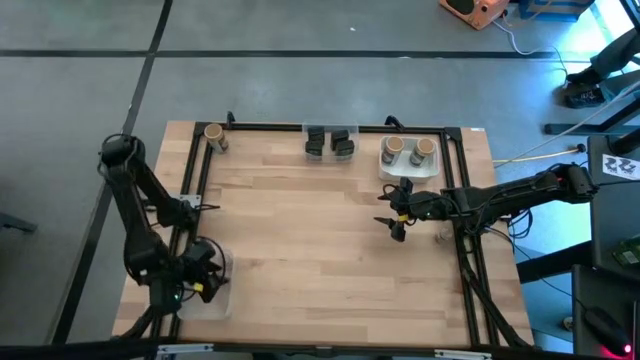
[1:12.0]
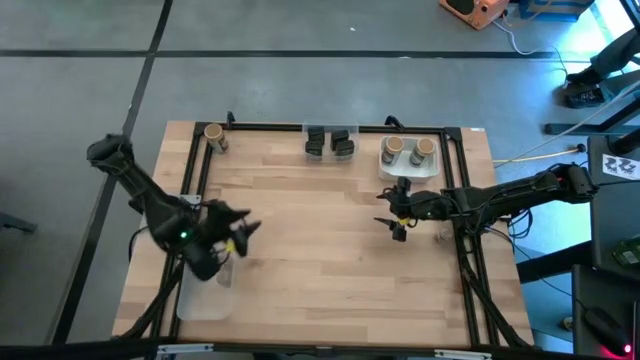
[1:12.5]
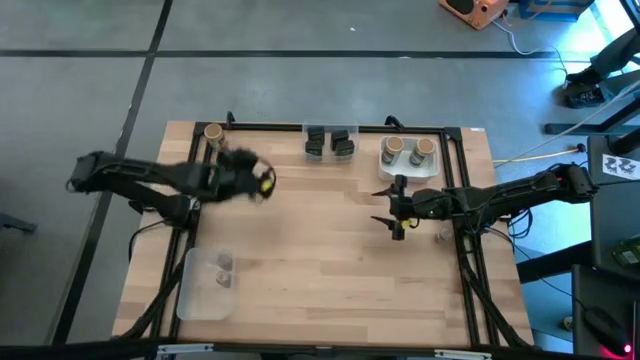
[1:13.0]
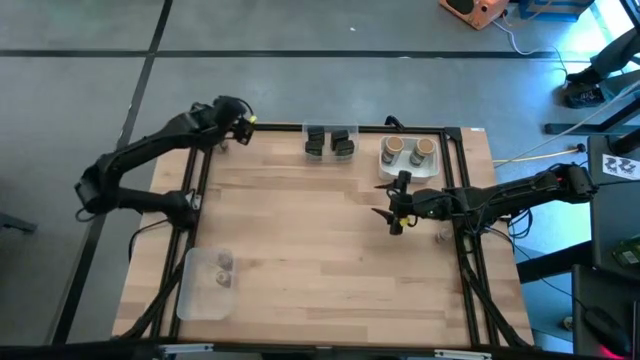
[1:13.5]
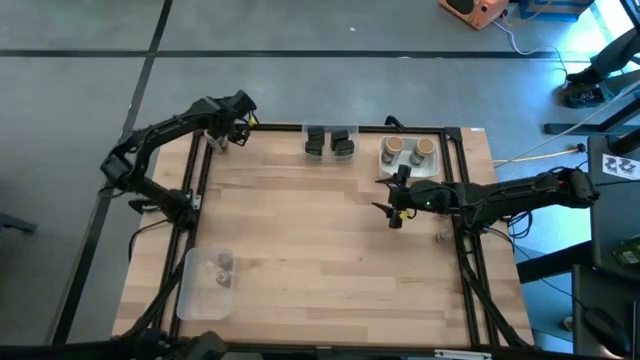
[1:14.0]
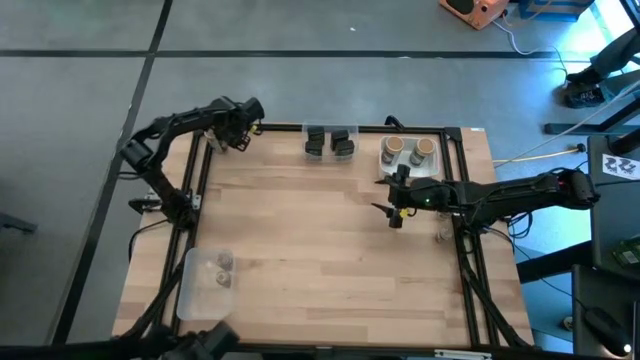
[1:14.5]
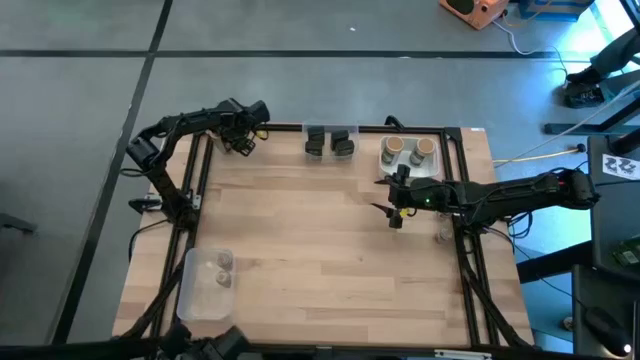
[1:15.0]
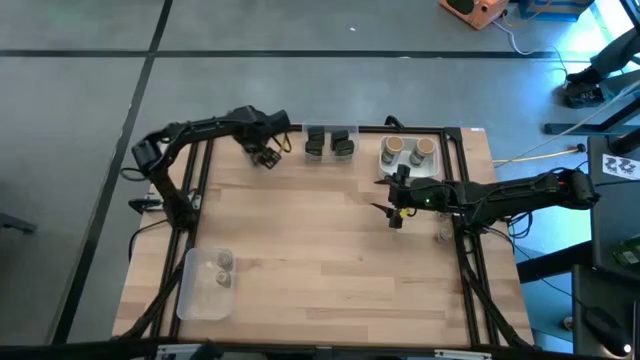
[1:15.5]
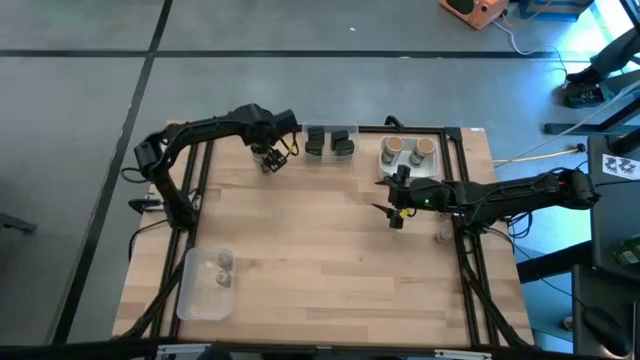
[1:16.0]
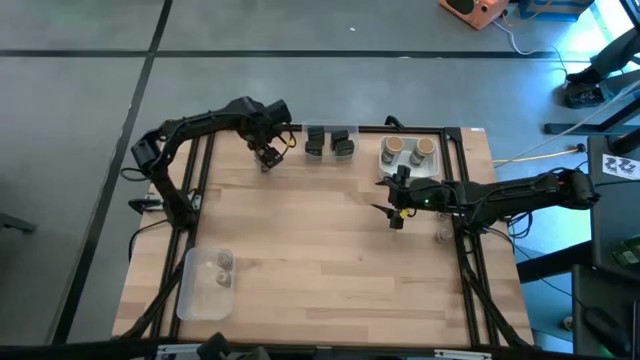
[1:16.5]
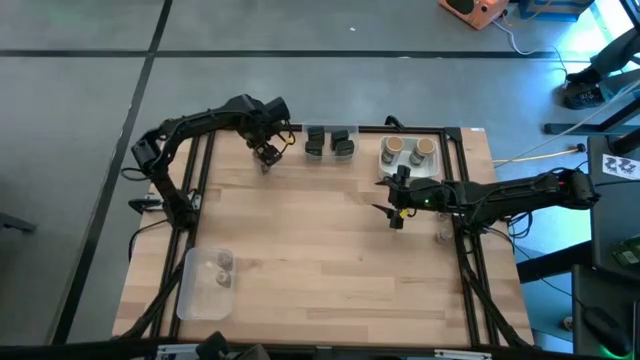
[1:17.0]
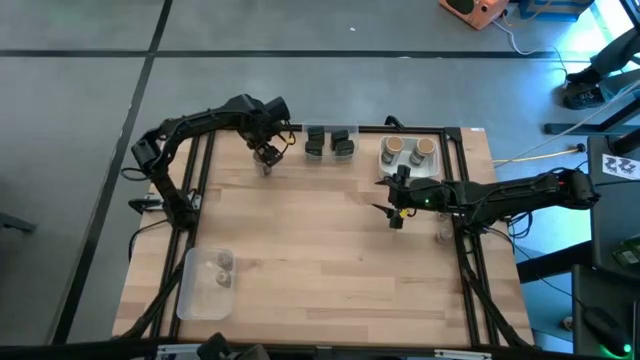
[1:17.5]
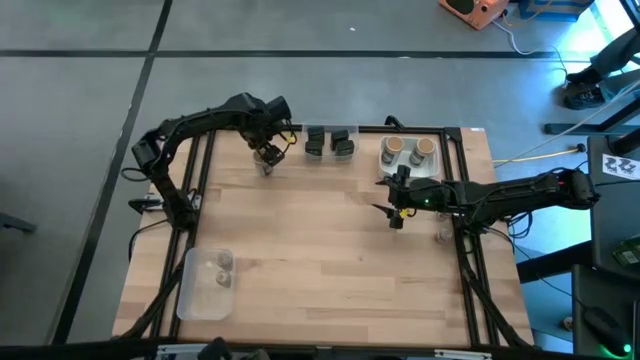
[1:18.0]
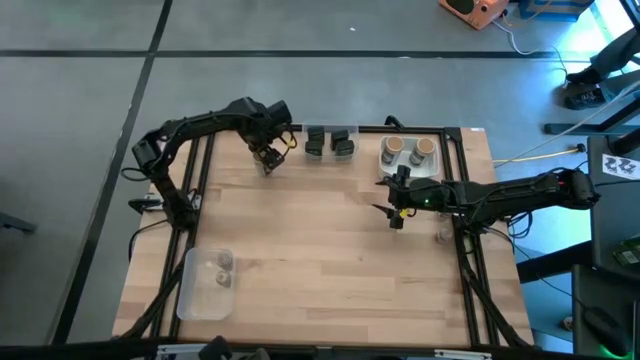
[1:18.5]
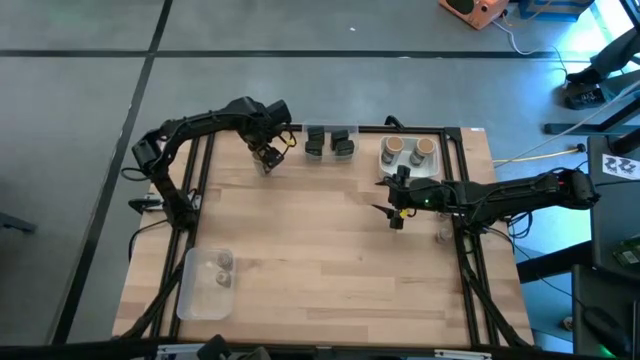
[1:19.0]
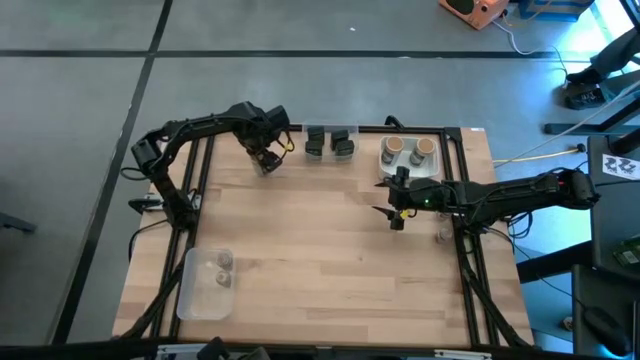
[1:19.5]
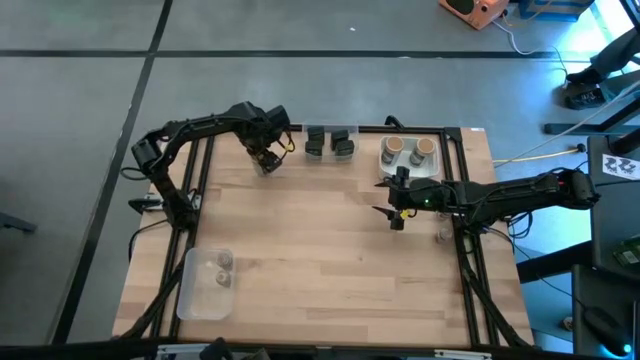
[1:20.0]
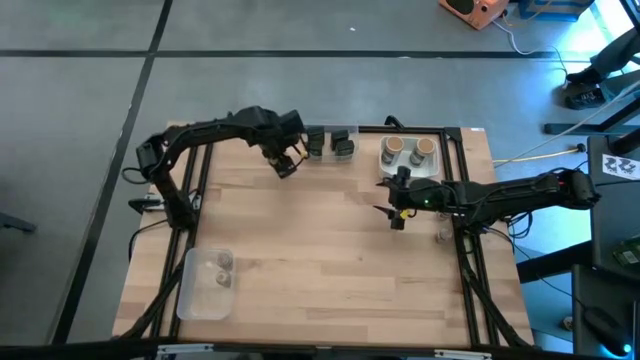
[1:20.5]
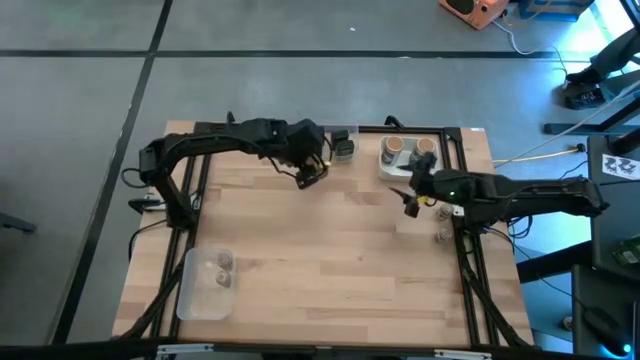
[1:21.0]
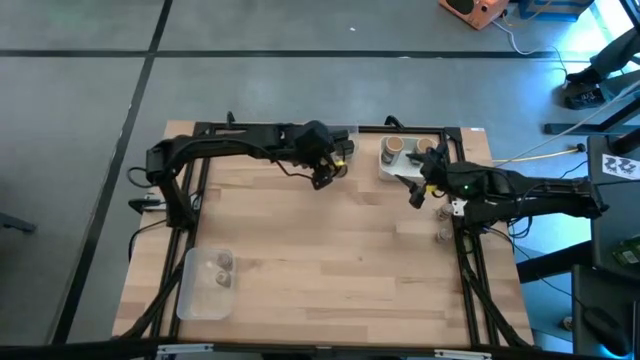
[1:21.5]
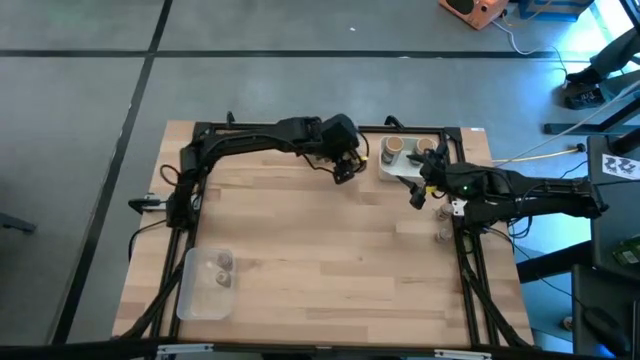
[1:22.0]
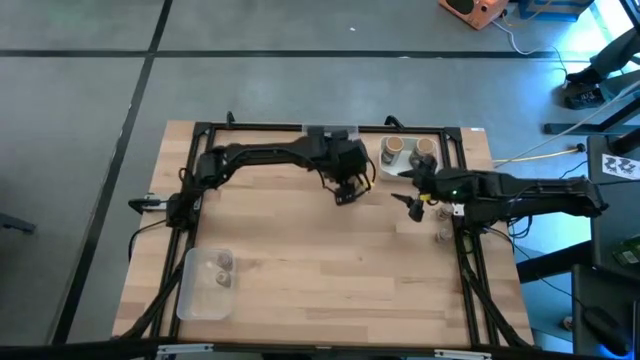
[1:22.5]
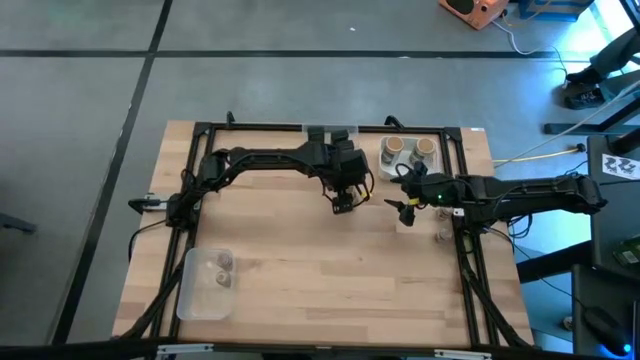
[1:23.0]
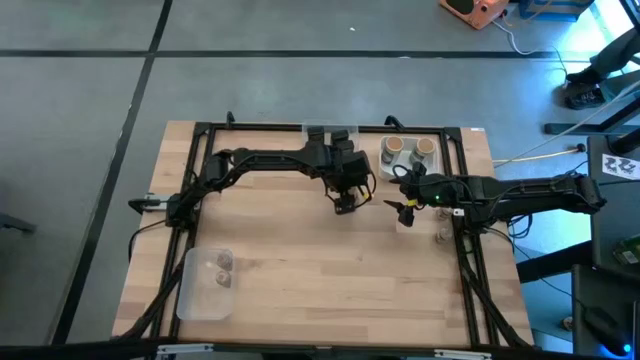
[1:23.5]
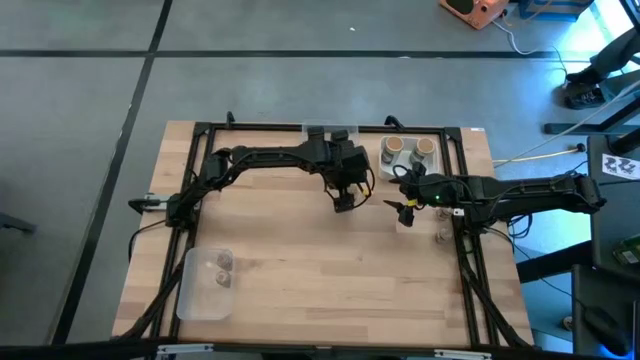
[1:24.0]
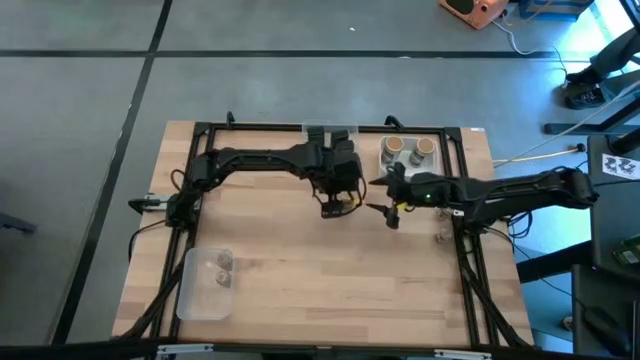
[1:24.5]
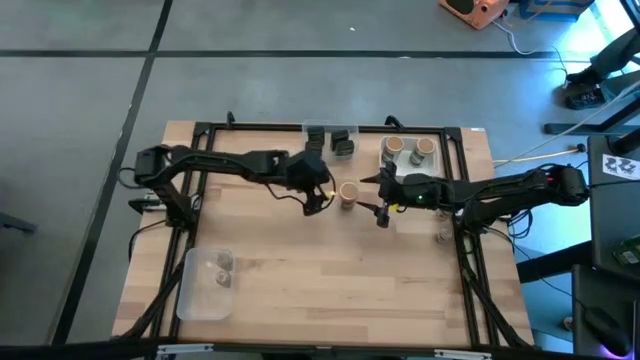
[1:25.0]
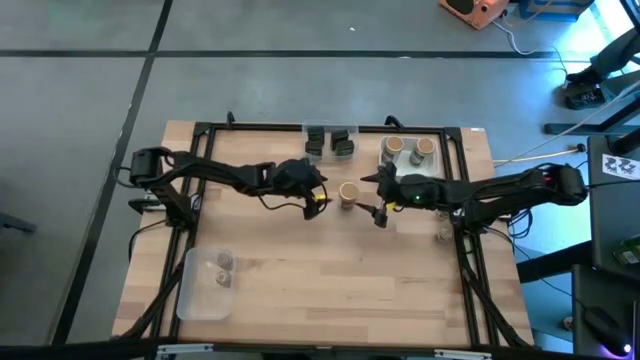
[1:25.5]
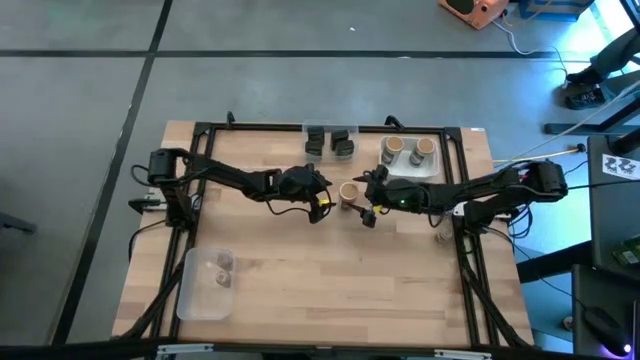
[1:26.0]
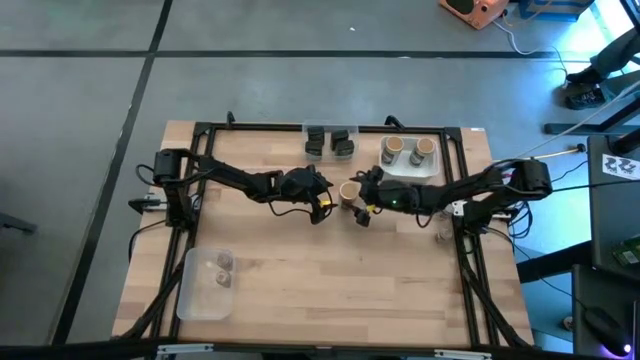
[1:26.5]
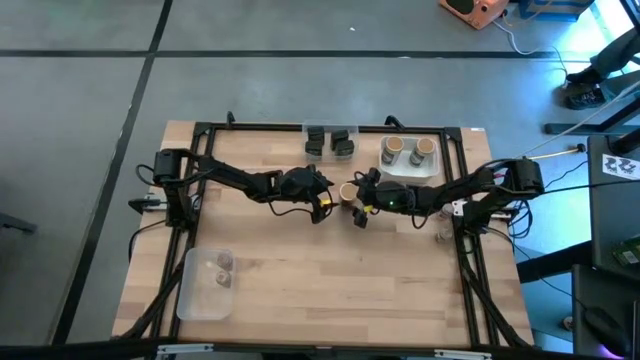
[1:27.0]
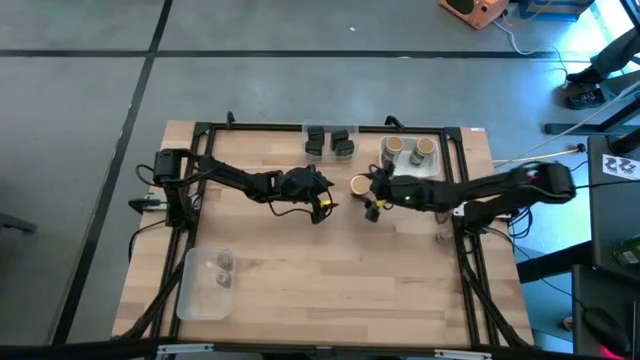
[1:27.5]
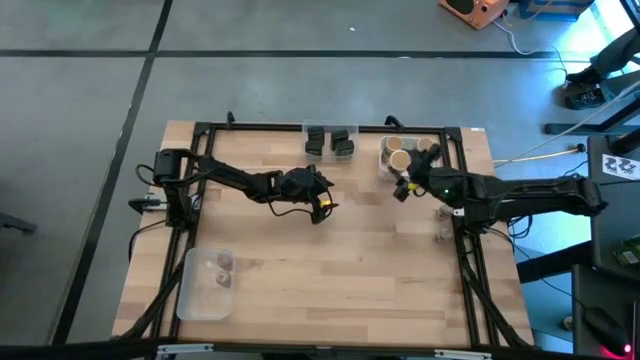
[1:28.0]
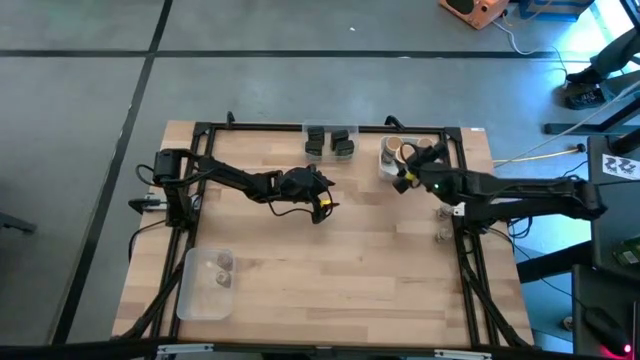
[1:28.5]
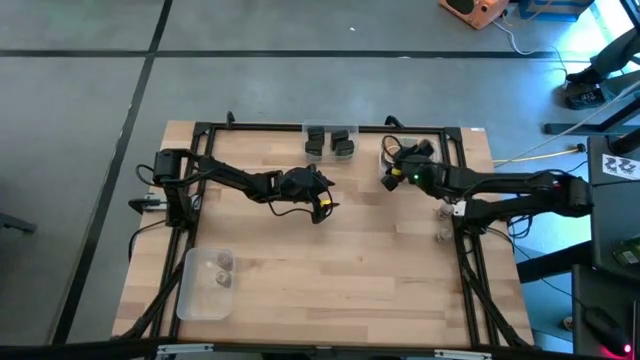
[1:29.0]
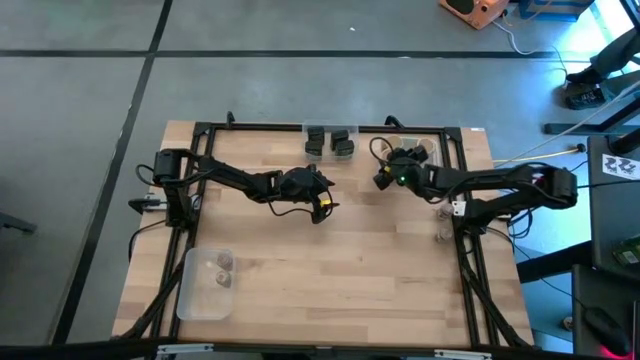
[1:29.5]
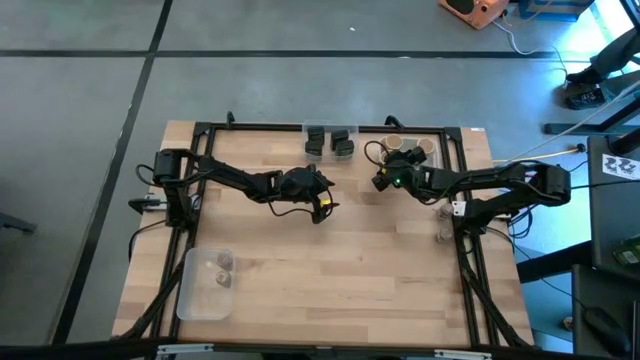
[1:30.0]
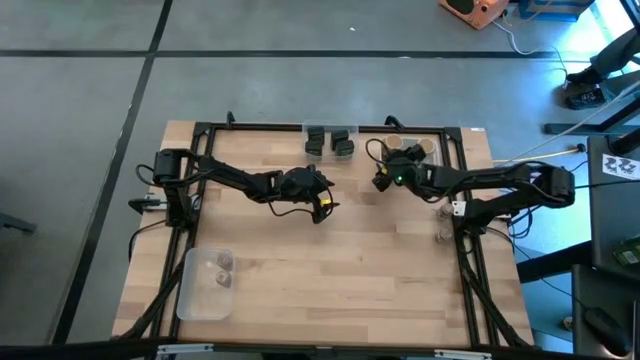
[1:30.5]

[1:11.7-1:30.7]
Task: Sort spices by type
Put the brown seasoning bottle into the white bin

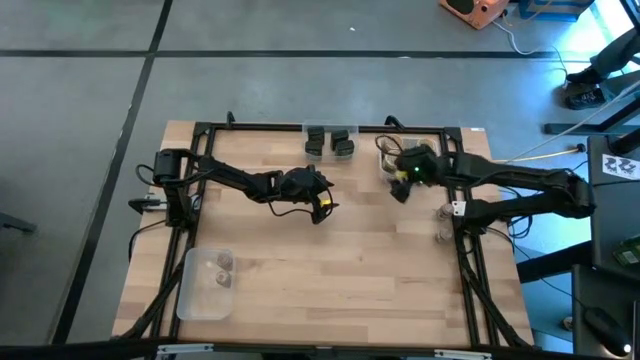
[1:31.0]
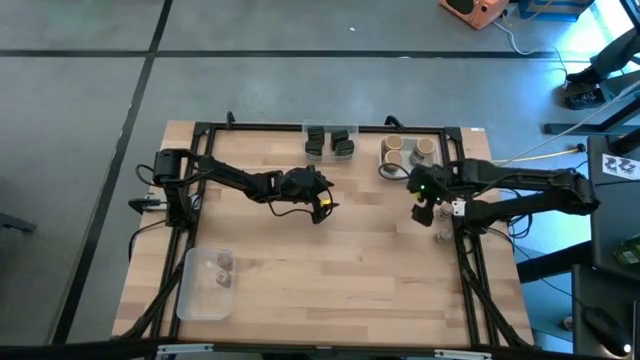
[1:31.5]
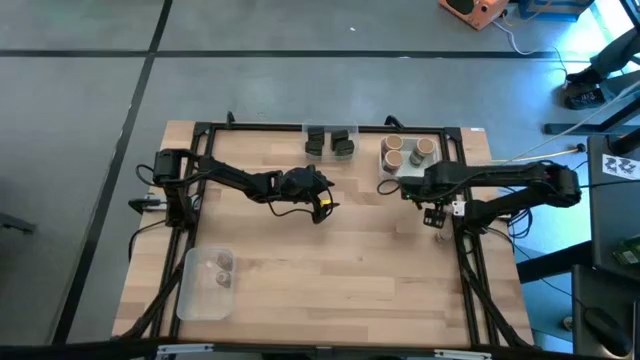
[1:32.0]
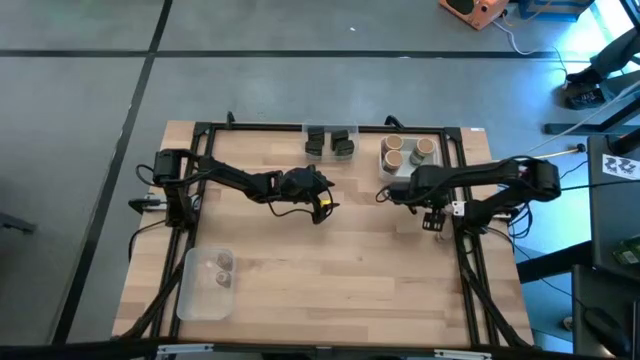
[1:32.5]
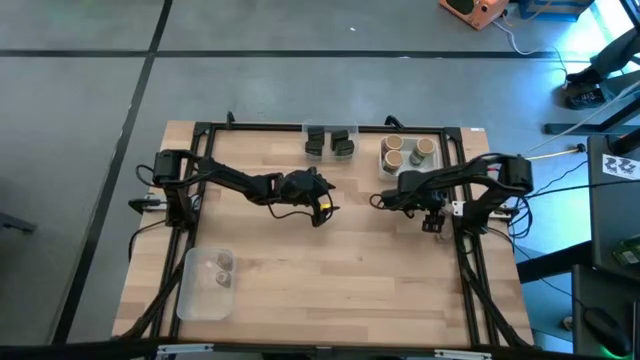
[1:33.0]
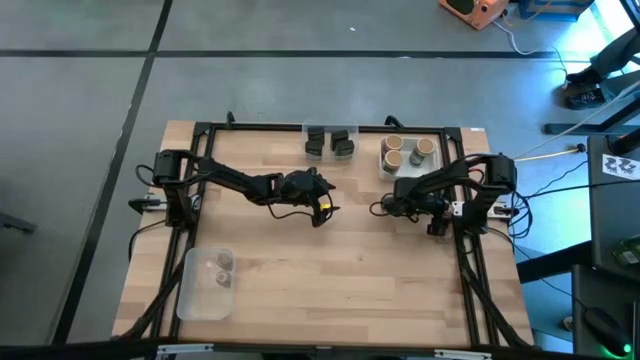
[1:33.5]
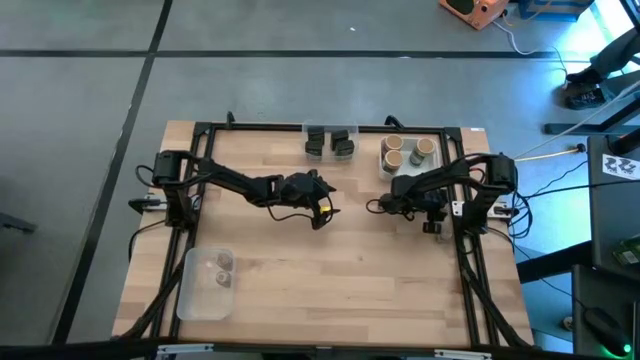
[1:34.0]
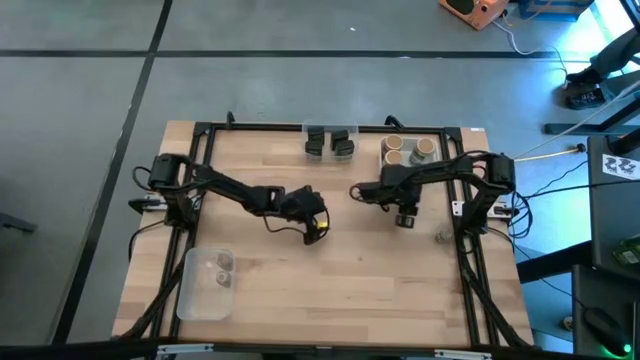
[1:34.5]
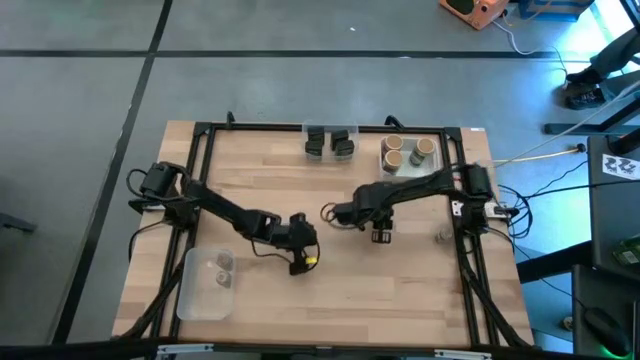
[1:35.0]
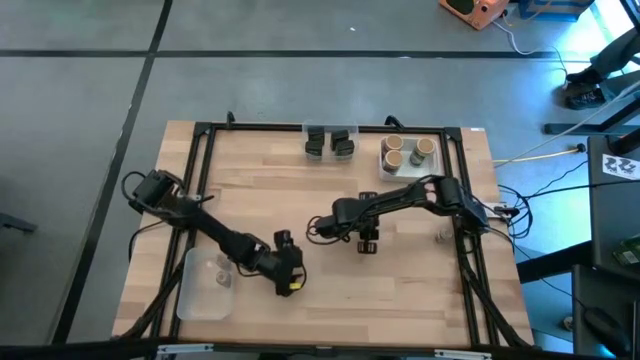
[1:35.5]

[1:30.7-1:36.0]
Put the top transparent seasoning bottle into the left transparent bin
